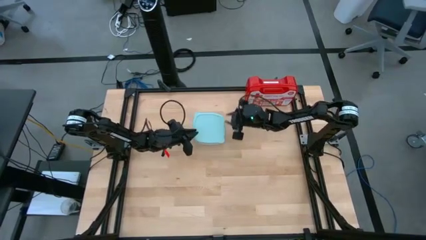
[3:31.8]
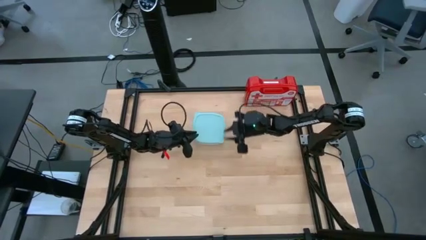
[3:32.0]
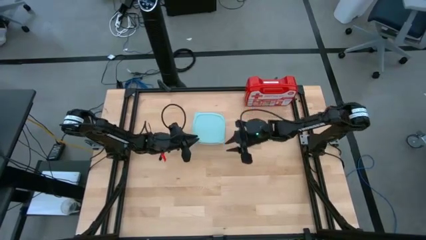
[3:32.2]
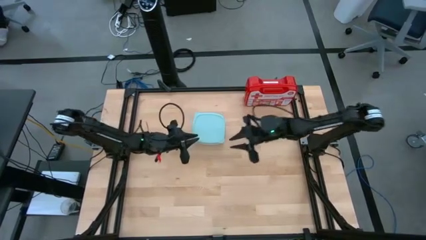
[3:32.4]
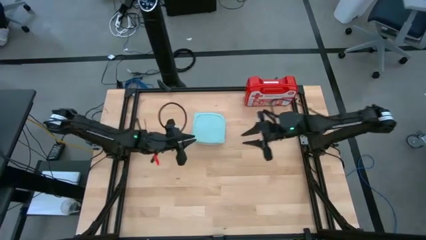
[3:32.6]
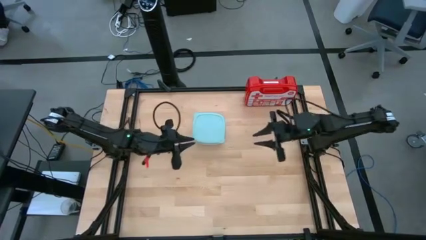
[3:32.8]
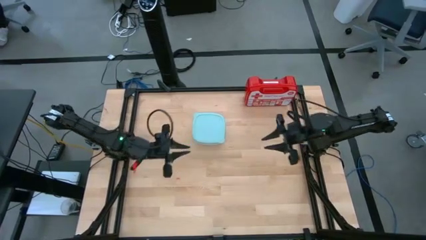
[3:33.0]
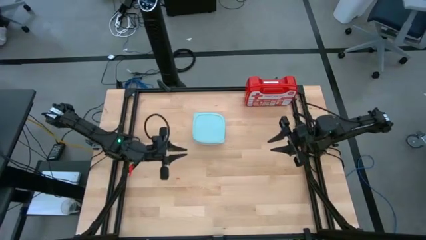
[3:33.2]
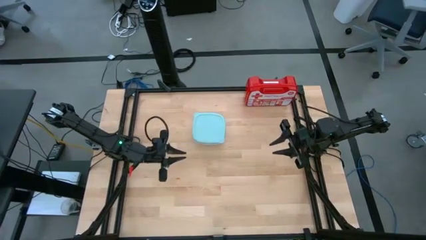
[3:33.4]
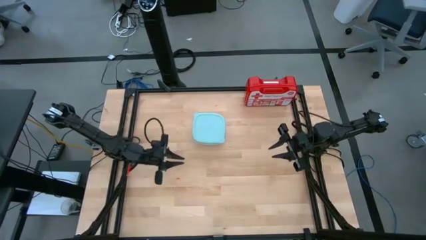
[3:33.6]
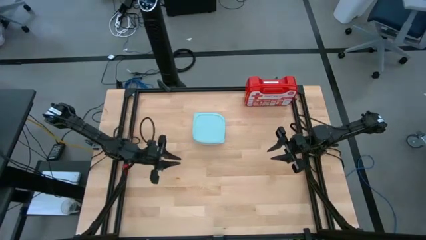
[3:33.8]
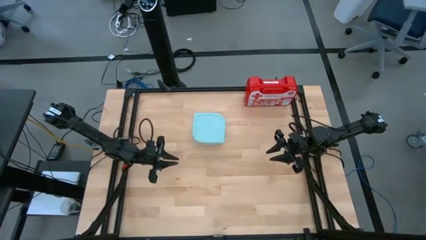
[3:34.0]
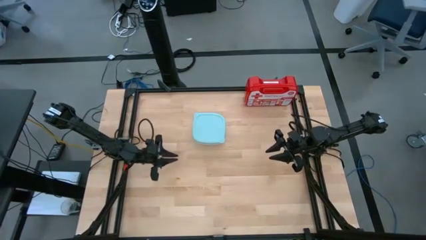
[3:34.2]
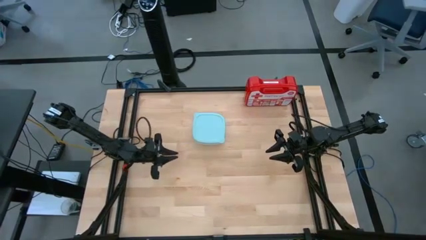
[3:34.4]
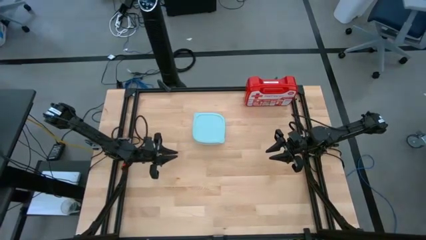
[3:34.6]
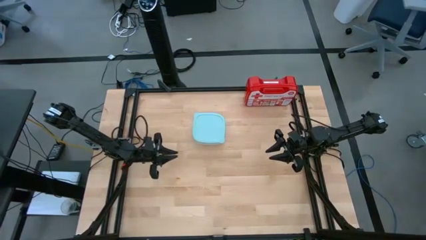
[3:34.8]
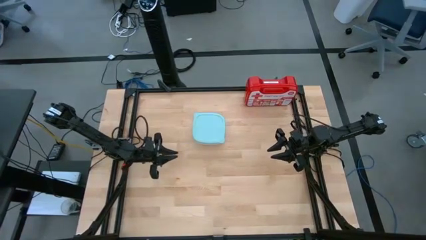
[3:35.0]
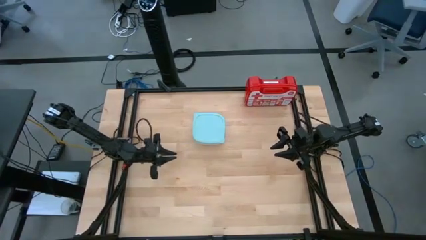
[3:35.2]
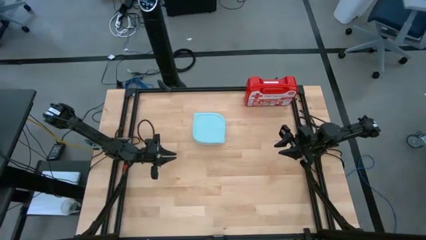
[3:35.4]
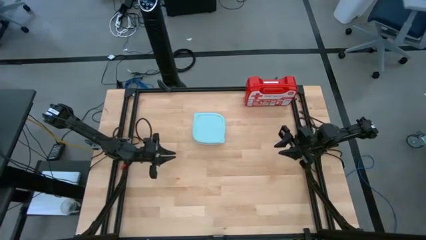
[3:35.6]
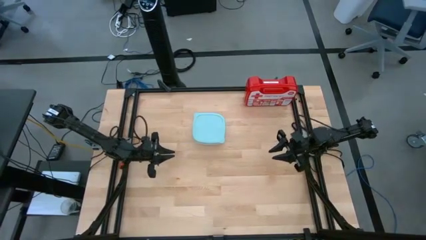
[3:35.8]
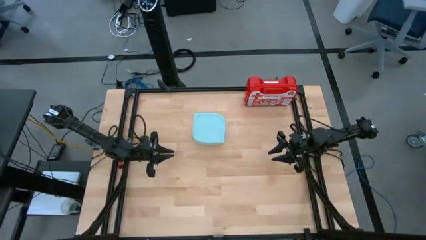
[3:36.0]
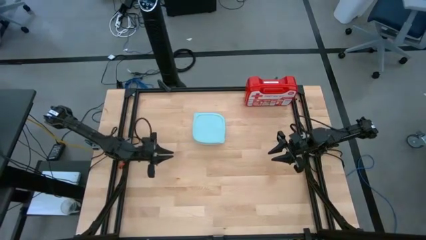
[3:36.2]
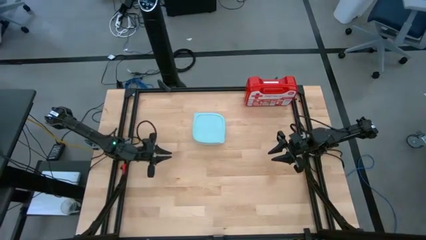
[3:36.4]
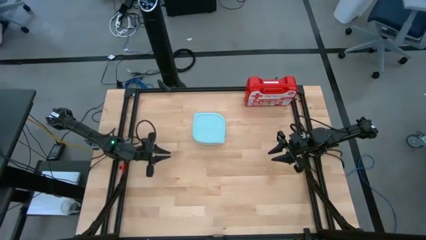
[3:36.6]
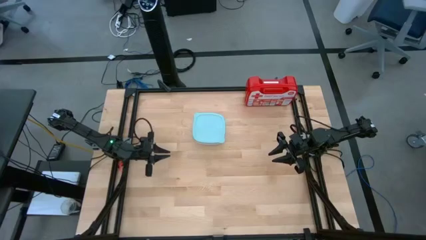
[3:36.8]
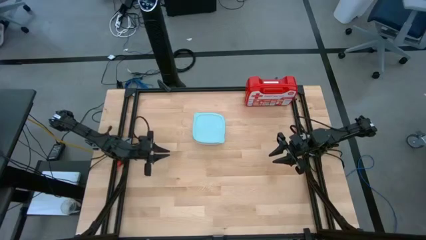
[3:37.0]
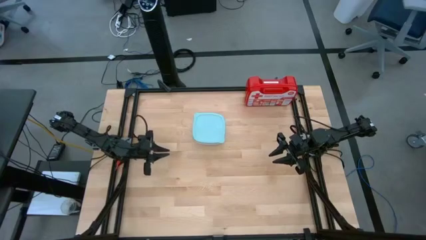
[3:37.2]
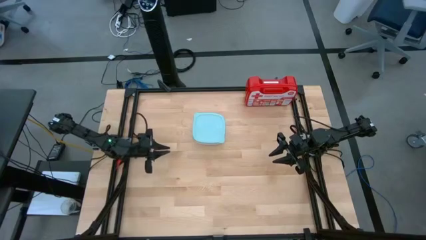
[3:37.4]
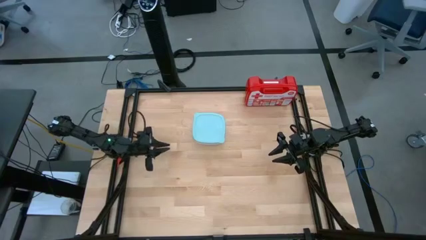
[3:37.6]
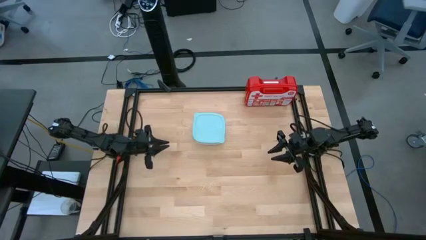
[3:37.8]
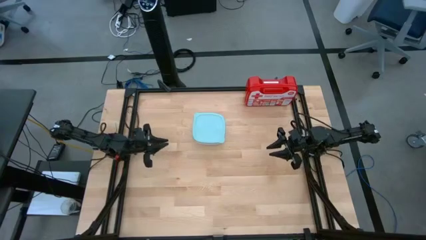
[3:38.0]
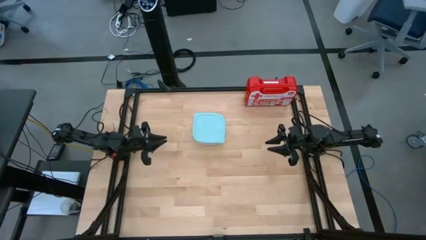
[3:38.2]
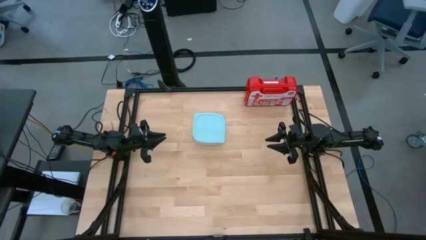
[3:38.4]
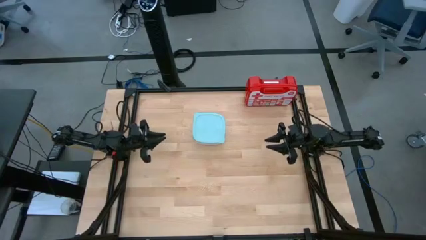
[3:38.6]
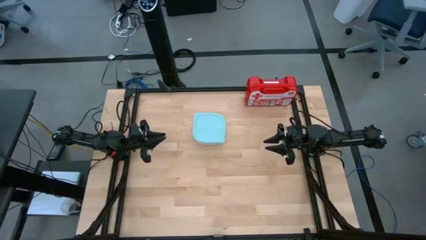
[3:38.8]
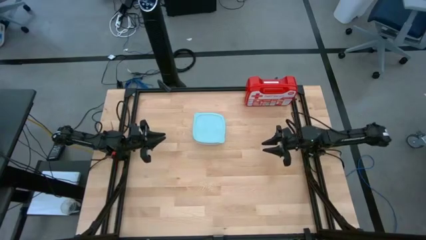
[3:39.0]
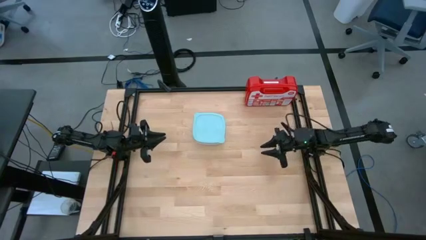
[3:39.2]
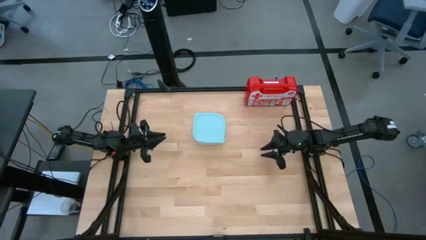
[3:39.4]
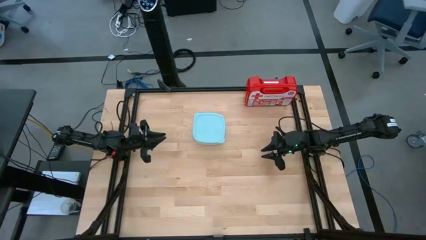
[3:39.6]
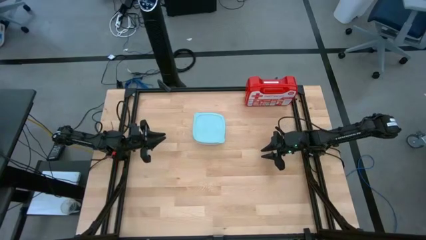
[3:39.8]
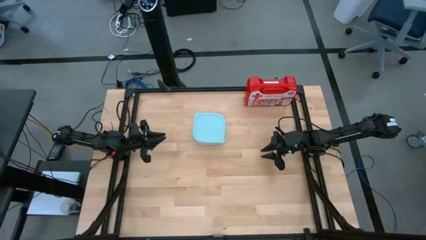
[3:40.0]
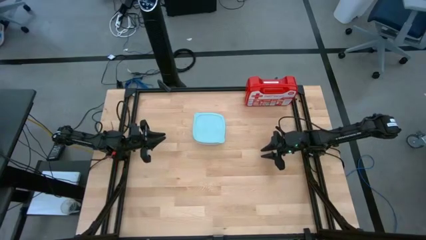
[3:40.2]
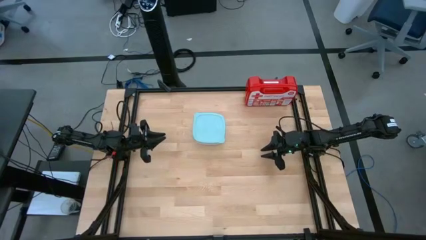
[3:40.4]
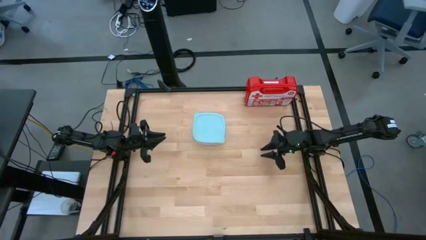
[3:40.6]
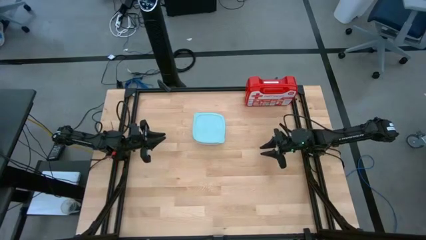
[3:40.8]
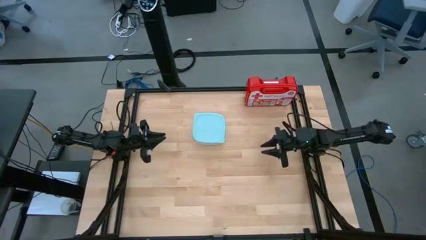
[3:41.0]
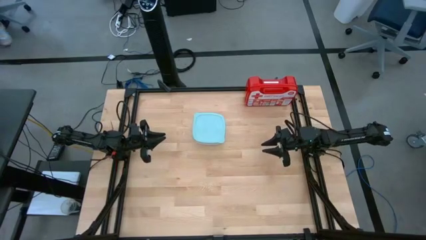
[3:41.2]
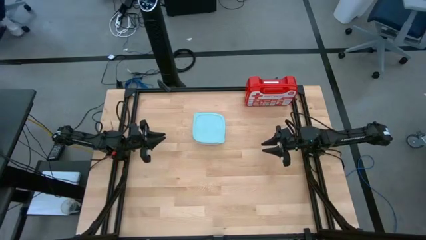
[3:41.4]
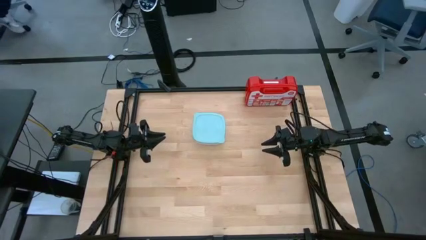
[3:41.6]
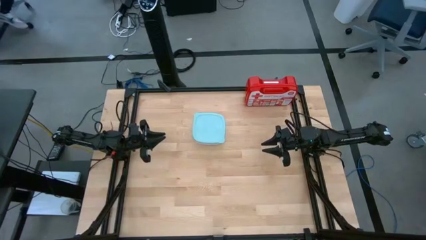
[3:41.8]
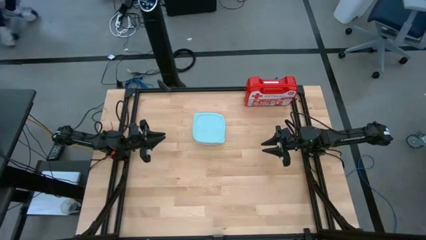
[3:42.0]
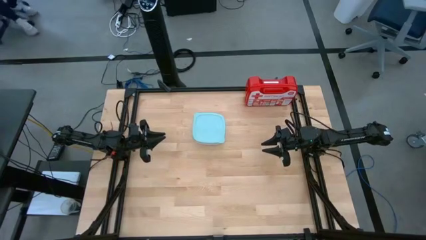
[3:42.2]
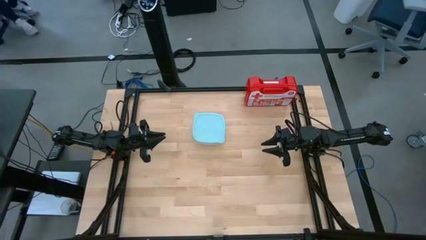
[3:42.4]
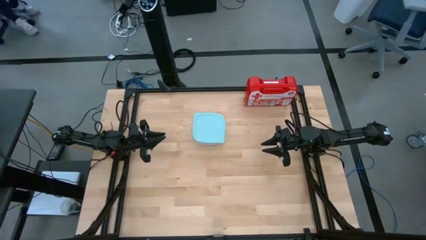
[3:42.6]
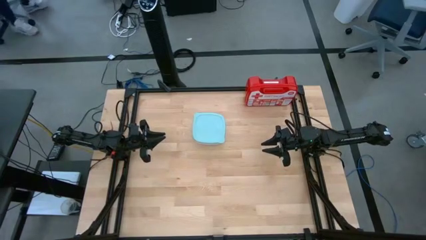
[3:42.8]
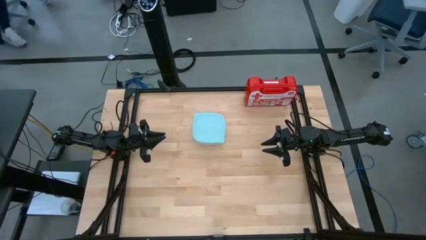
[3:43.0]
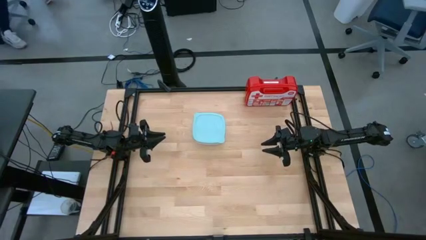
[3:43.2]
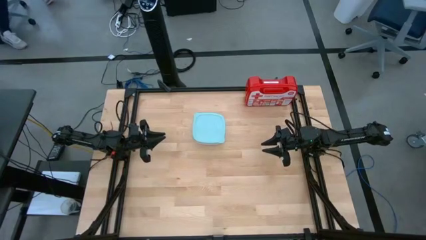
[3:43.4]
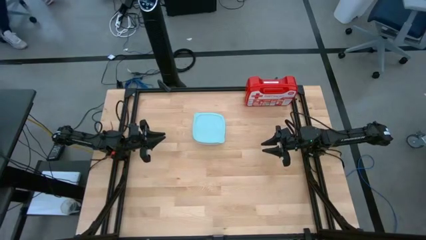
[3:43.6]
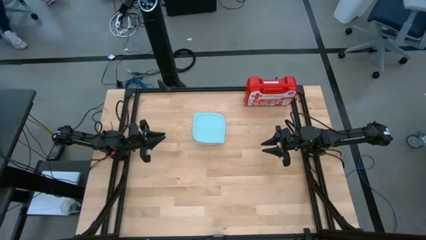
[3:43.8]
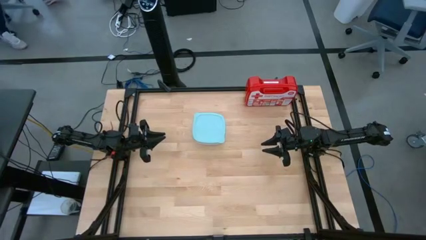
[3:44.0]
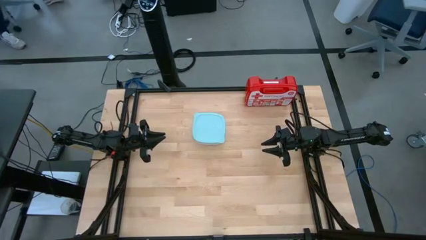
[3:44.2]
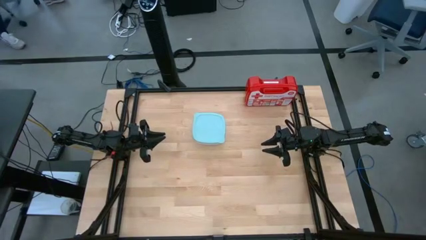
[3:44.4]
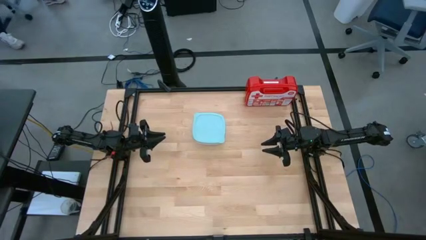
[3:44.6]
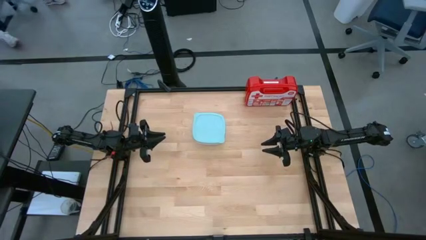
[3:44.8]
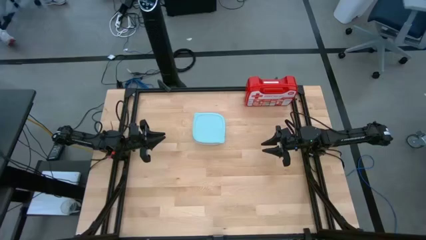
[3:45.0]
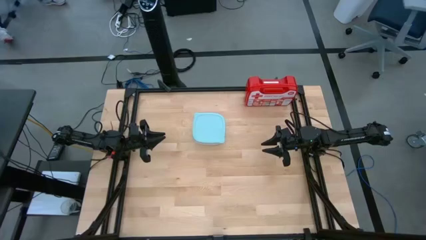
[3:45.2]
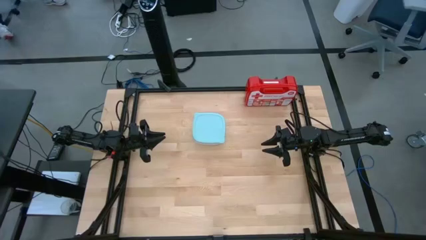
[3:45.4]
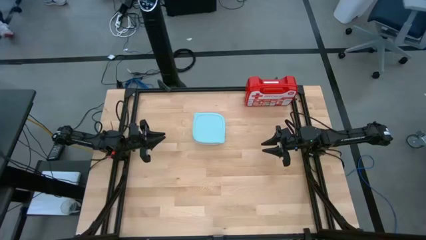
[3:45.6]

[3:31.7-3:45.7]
Task: Roll bandage
Return to Home Position

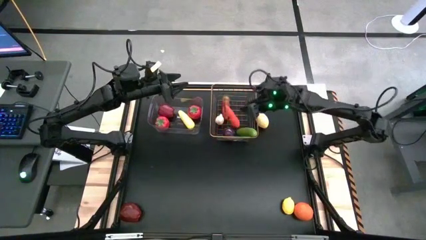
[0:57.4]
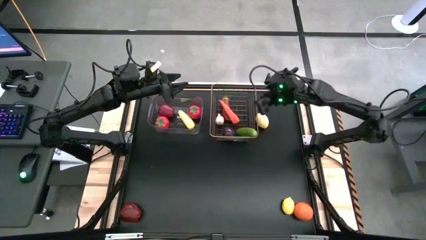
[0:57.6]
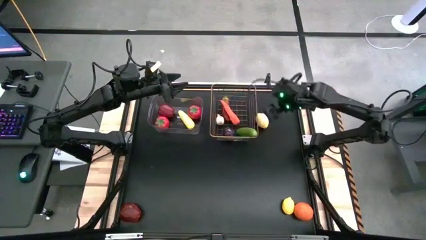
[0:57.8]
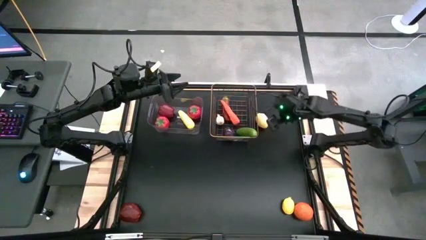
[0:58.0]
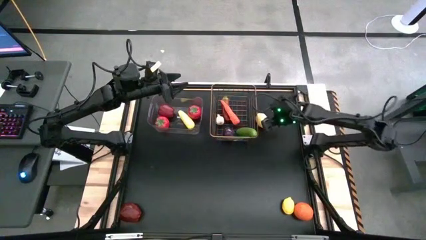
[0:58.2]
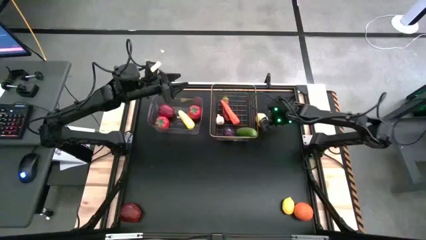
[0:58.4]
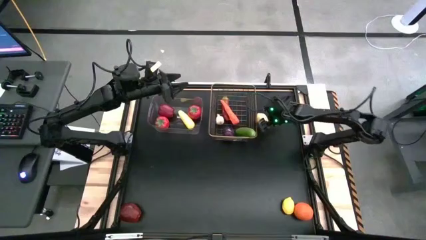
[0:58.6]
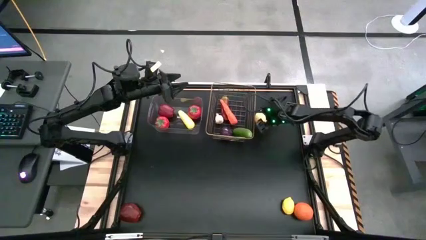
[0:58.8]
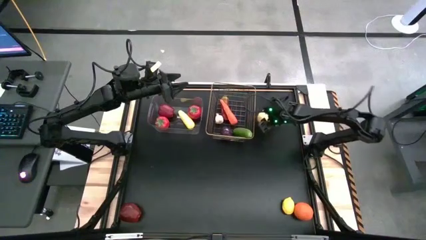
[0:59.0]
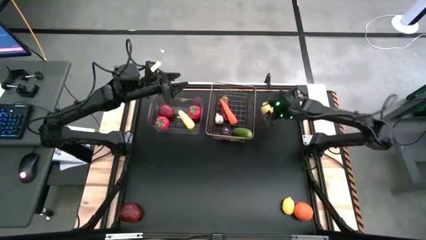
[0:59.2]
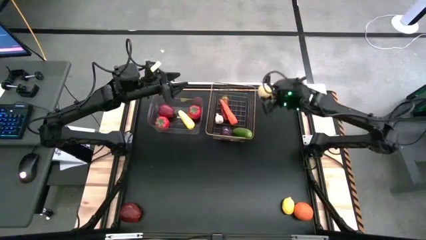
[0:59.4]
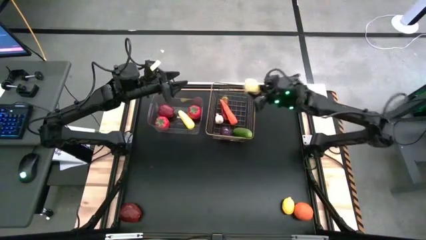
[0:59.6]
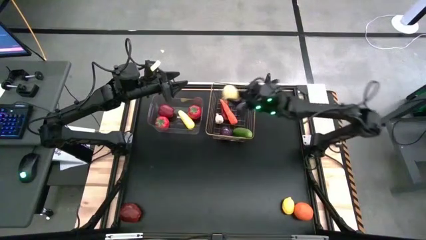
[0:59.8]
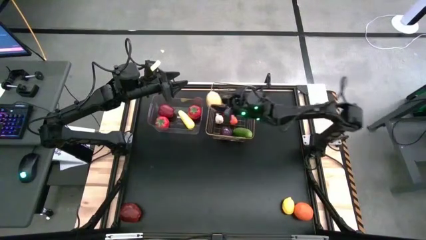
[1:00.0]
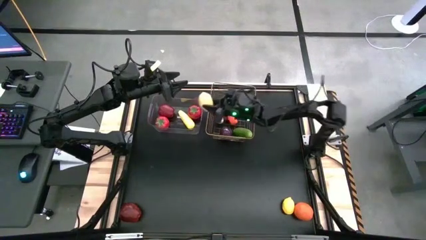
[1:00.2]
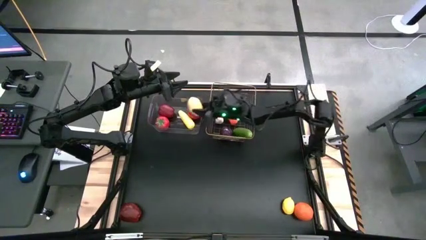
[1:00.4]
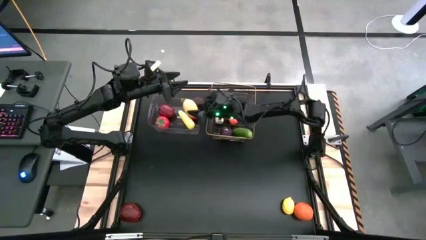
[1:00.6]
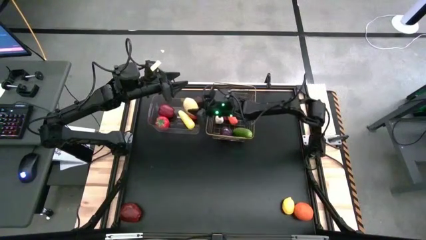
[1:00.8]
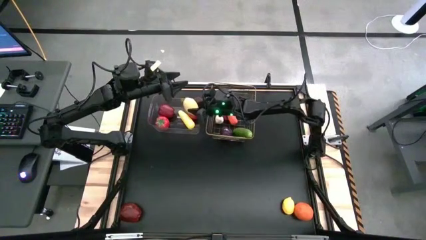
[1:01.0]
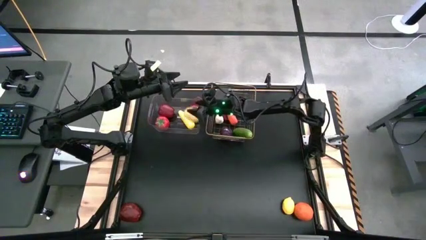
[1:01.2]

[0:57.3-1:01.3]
Task: Sort produce into baskets
Put the top lemon into the transparent bin
